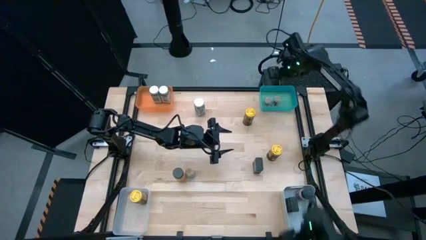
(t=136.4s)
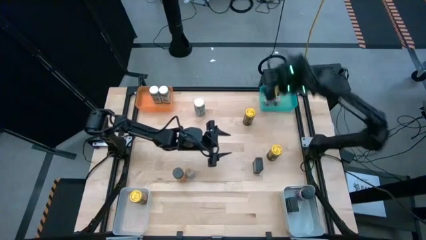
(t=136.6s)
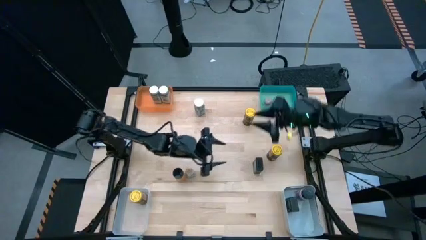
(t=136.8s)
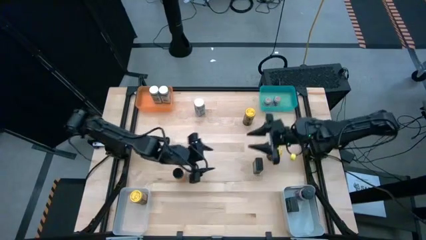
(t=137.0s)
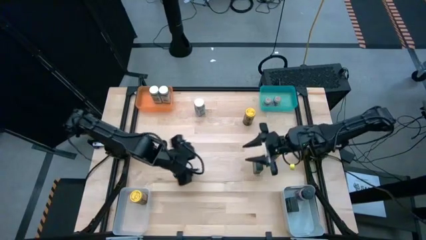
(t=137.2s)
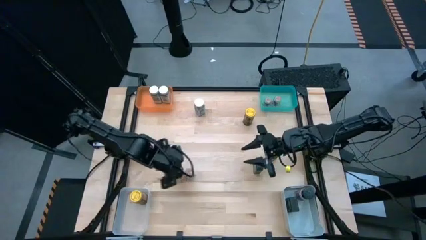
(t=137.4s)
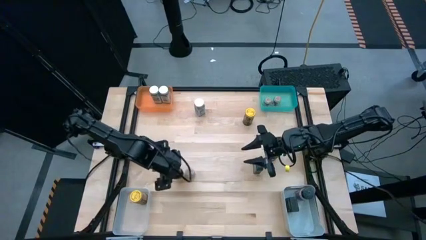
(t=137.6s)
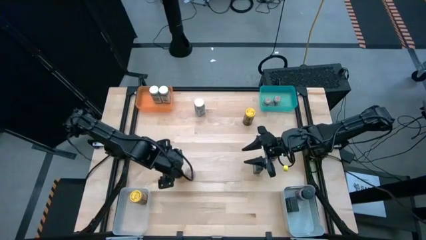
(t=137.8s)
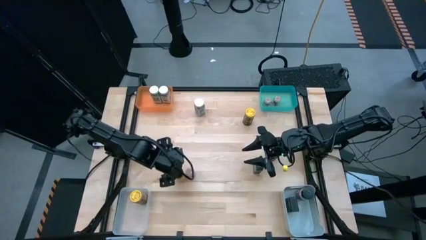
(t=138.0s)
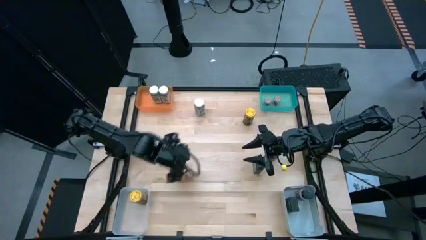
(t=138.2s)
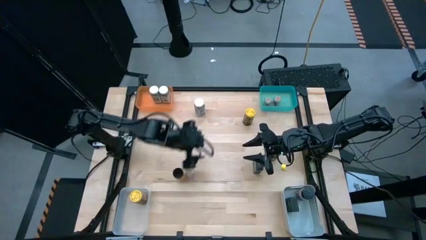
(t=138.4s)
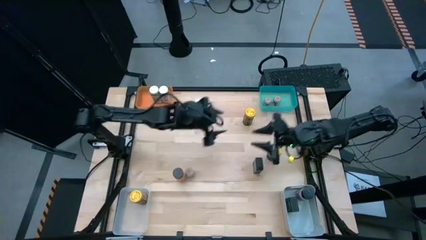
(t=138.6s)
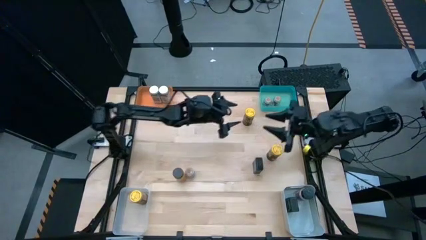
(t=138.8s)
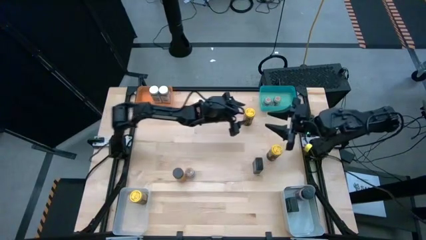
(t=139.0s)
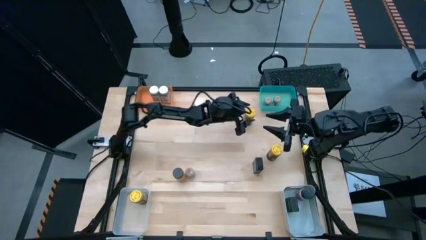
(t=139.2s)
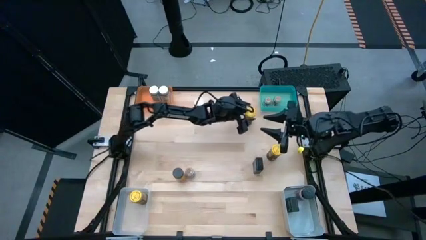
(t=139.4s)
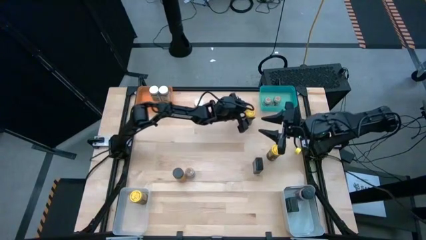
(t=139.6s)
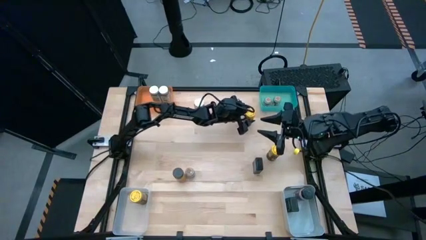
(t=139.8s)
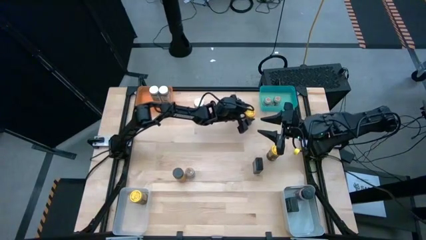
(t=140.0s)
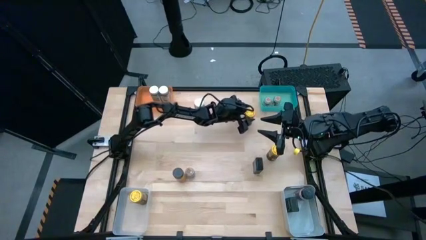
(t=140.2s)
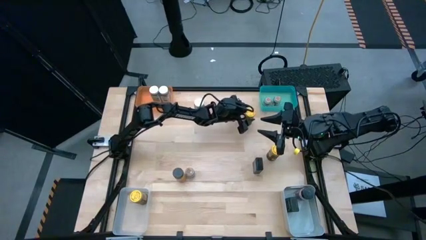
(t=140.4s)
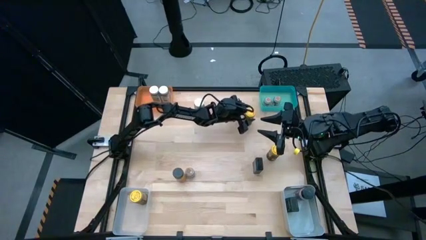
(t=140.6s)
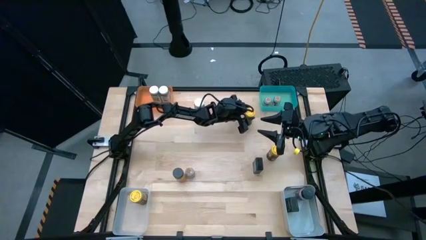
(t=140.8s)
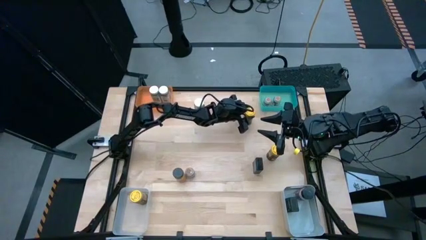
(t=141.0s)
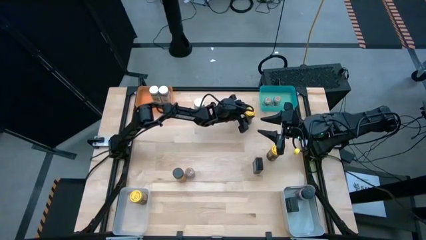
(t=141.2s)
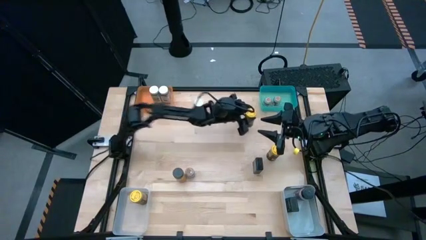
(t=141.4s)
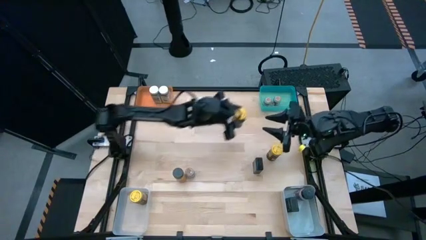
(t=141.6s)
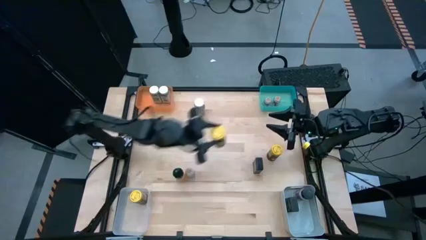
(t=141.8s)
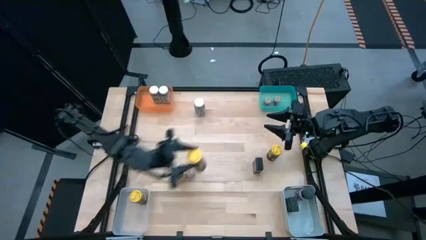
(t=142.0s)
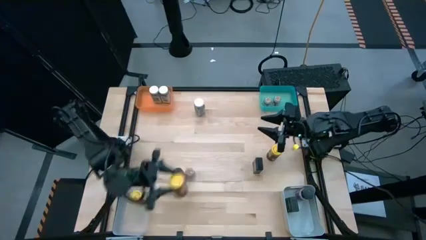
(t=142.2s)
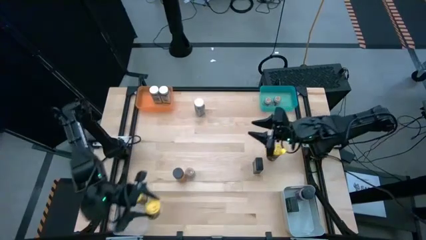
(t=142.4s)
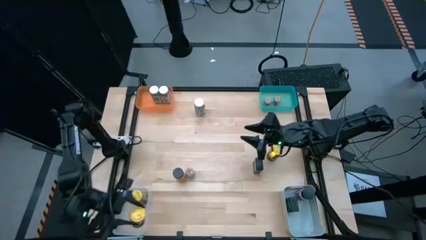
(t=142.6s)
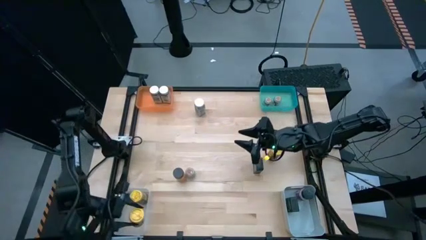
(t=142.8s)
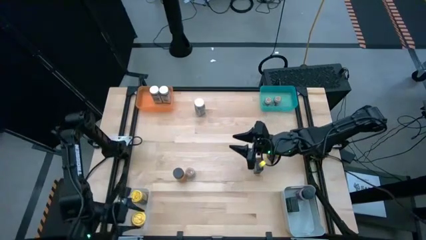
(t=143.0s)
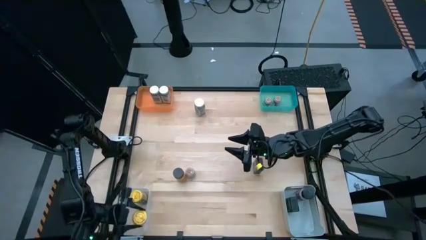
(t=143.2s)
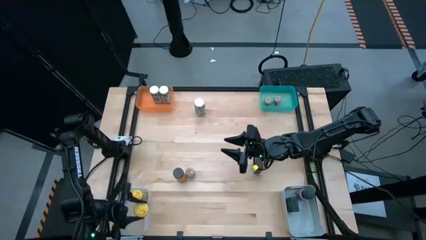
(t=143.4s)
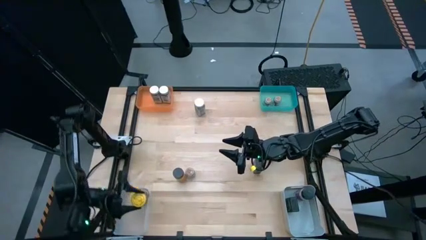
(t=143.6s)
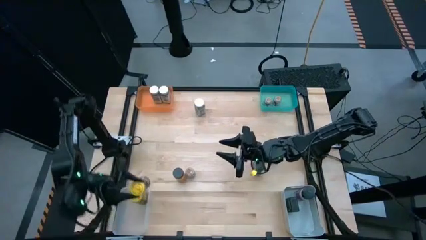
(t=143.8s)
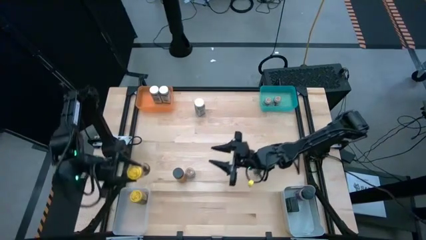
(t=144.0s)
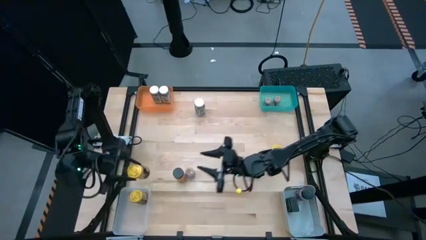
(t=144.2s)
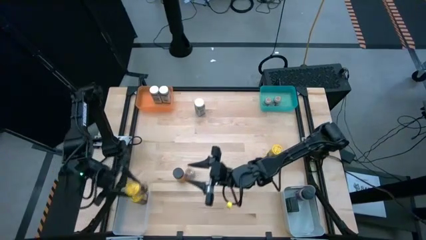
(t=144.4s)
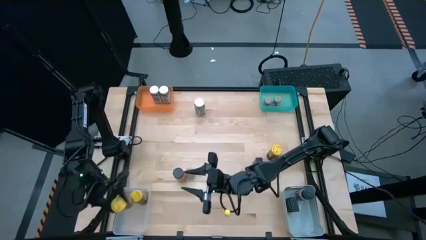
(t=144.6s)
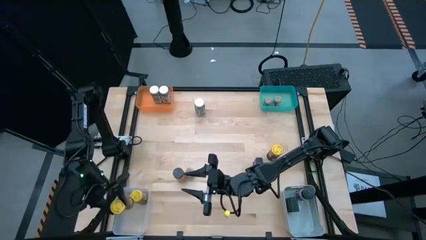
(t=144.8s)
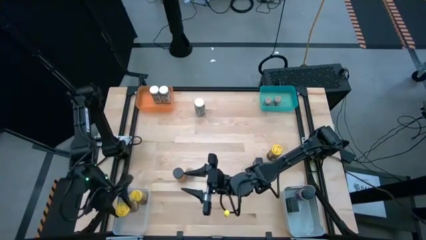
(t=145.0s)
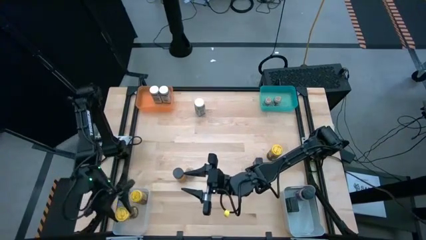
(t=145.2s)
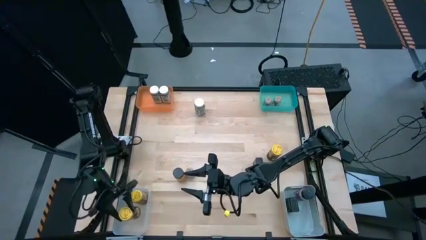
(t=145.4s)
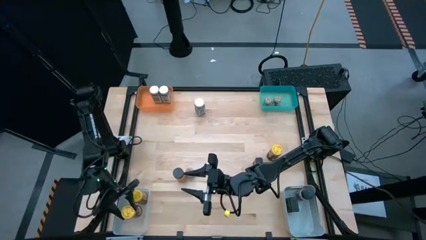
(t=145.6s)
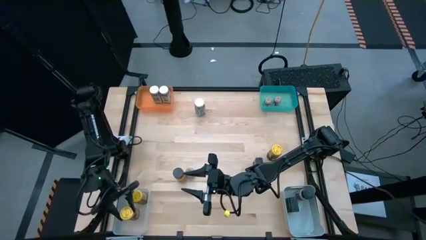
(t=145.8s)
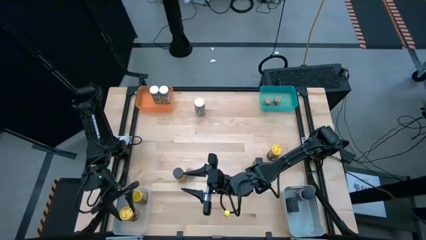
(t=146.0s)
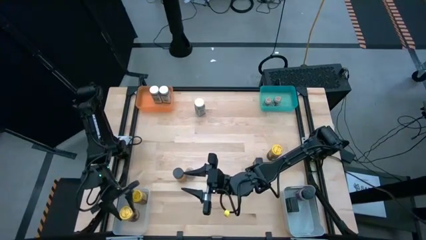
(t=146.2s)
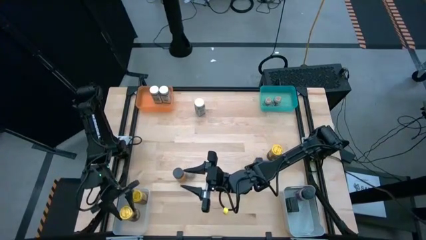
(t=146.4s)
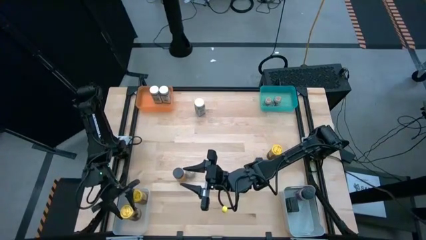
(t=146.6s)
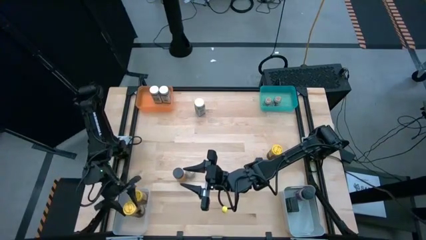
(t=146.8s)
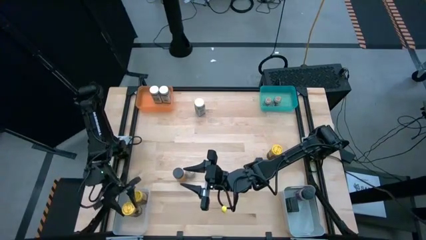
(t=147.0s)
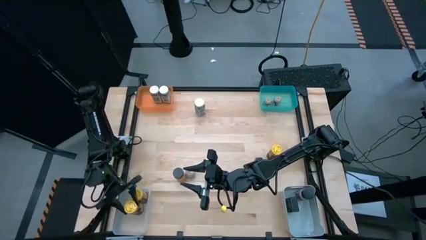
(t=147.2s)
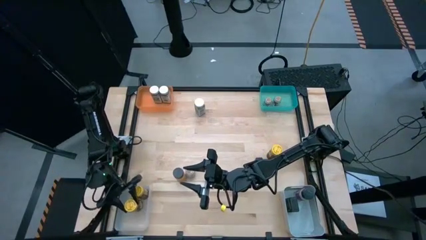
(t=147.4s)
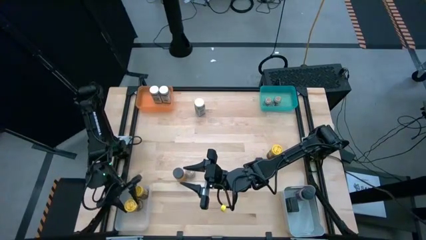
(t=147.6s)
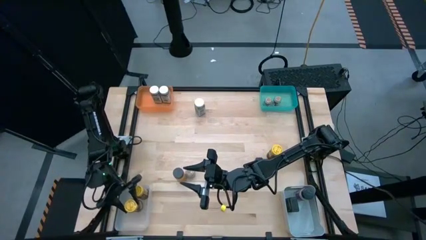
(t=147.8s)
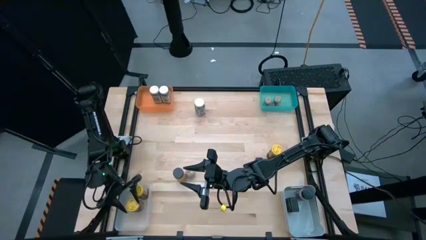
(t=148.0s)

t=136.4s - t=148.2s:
Task: Sort spices by type
Put the top yellow seasoning bottle into the transparent bin

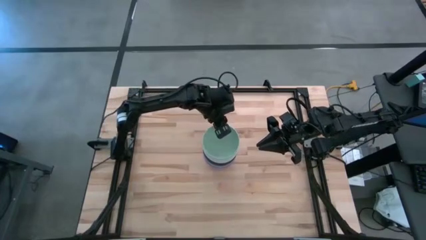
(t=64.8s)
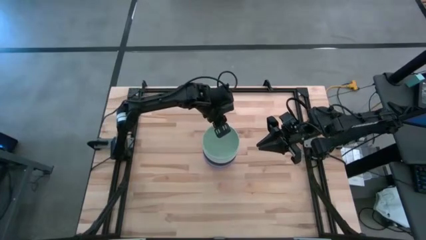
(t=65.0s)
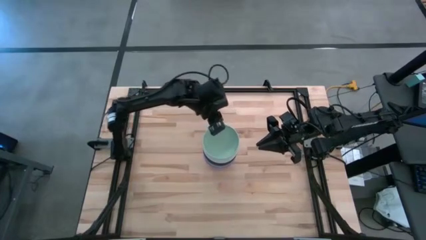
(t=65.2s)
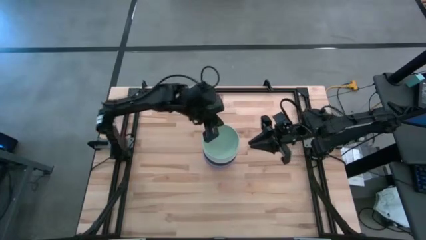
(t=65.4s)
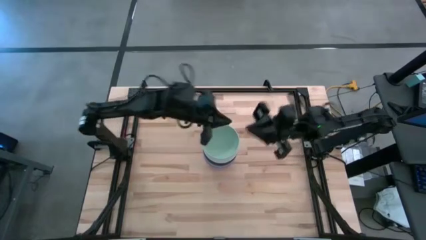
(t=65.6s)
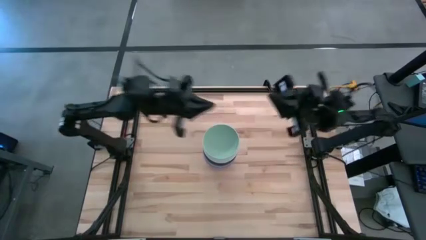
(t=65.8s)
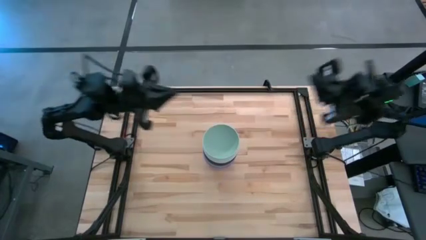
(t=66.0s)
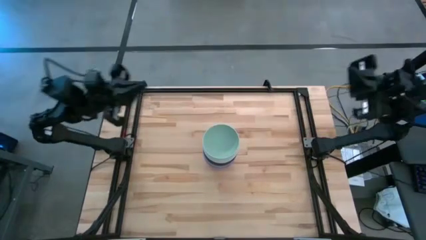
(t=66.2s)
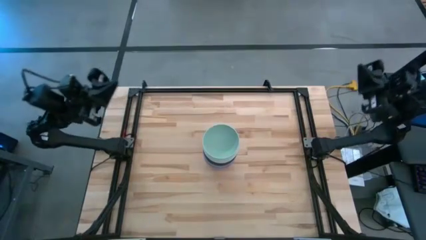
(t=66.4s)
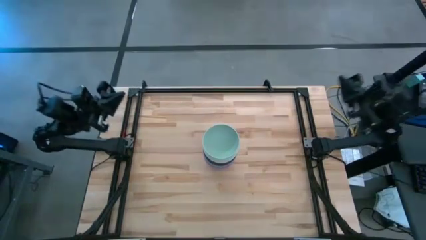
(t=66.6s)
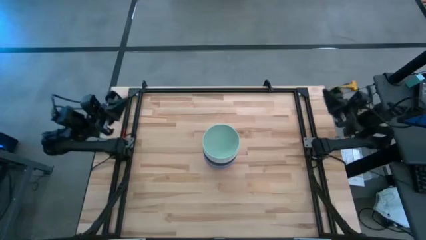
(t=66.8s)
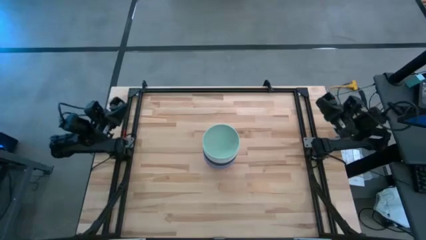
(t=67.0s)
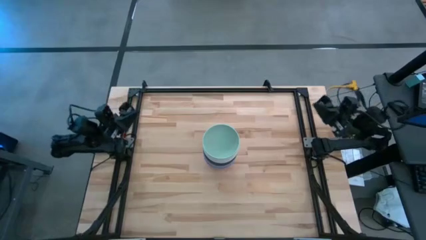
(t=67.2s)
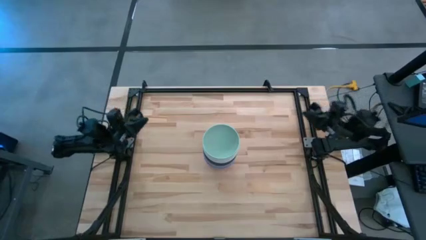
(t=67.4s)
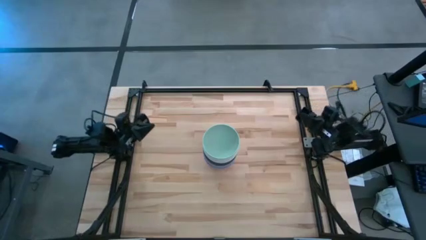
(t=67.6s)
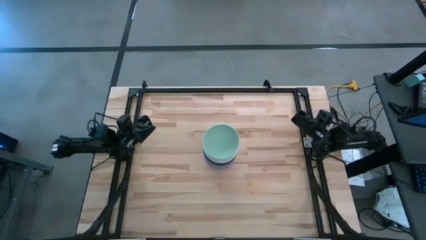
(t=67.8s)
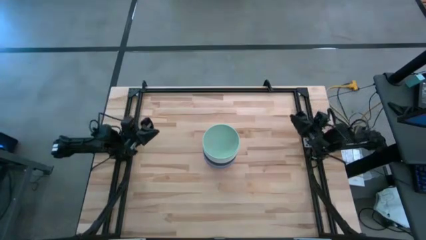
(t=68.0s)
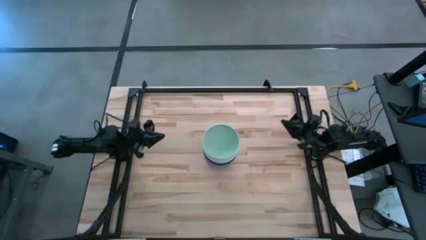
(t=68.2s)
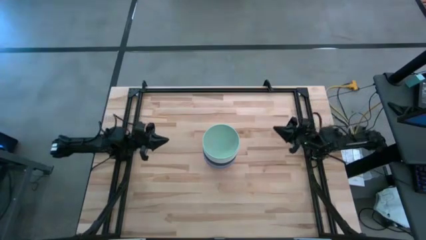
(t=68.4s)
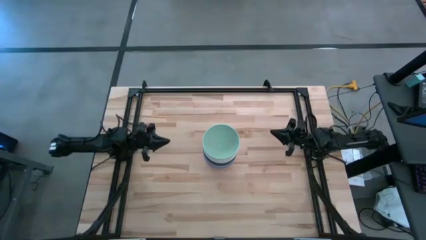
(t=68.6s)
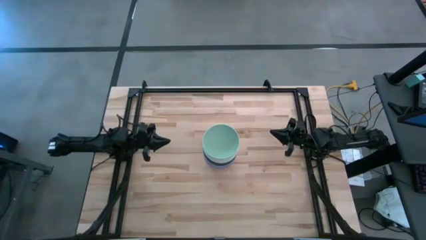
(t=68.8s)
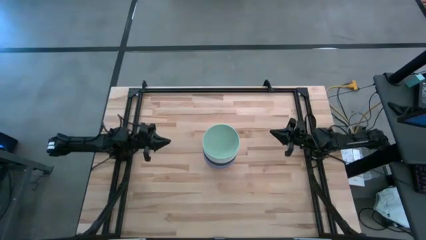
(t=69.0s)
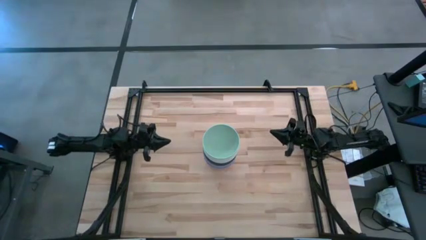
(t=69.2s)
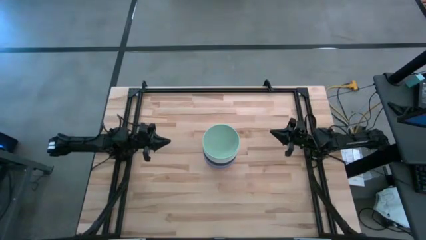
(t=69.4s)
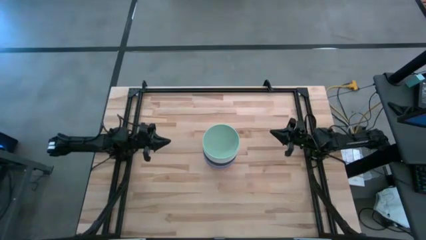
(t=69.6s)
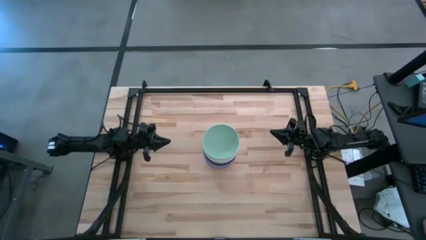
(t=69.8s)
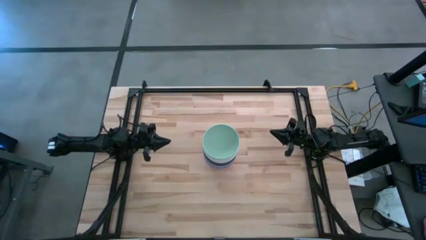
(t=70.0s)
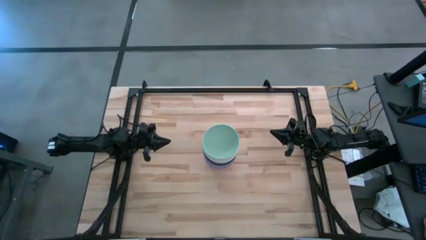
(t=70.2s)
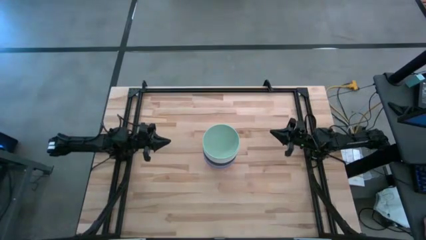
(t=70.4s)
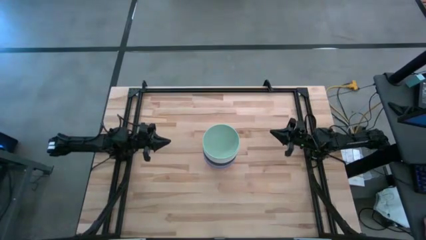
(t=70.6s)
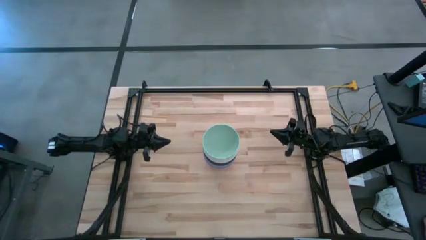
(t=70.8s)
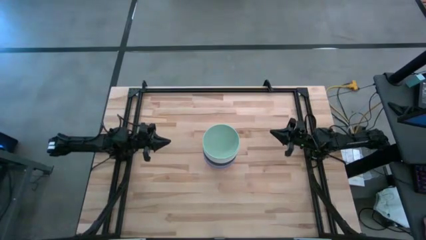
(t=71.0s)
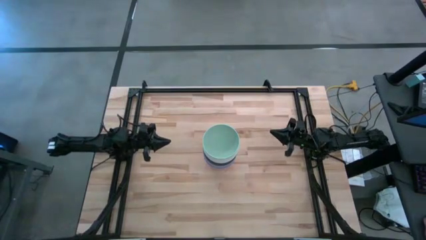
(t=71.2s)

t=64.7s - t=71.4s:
Task: Nest bowls inside each other
Return to Home Position
